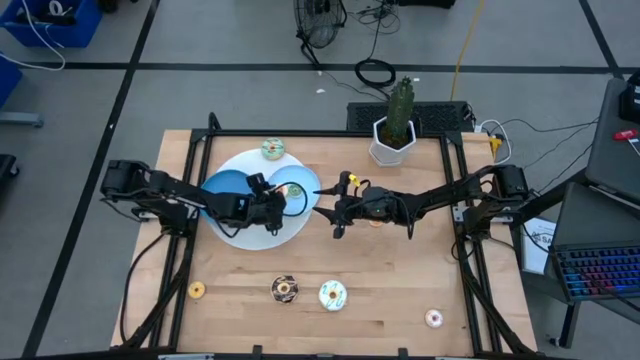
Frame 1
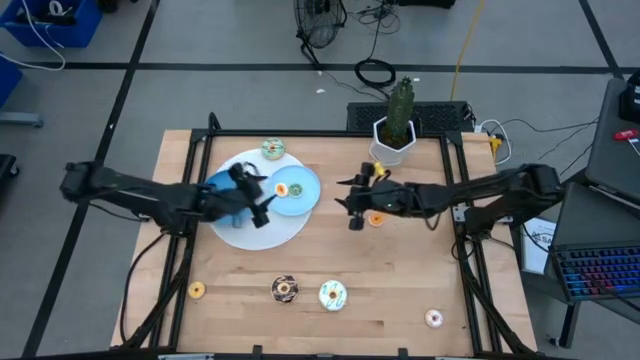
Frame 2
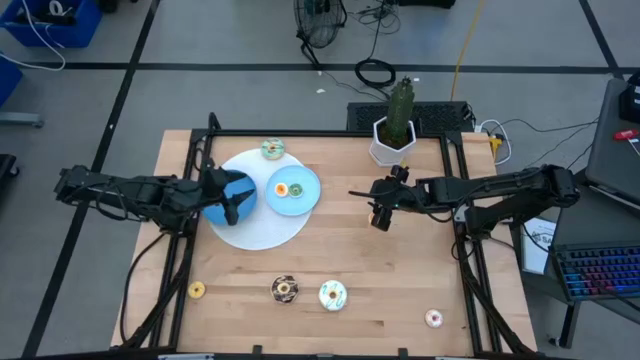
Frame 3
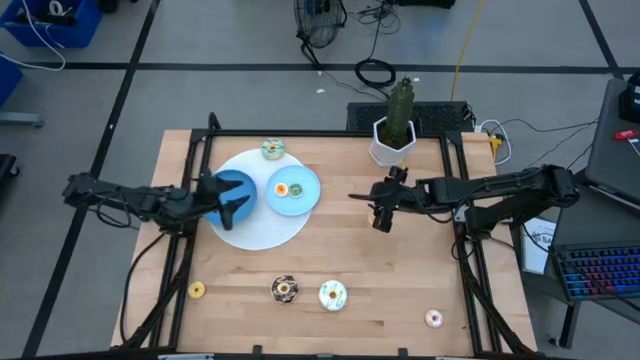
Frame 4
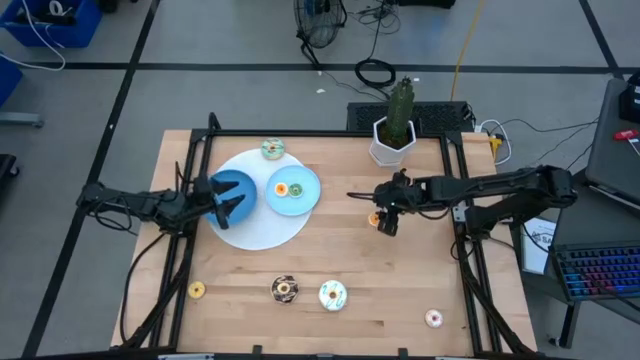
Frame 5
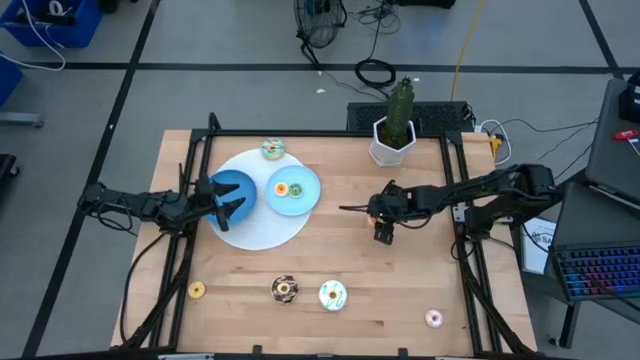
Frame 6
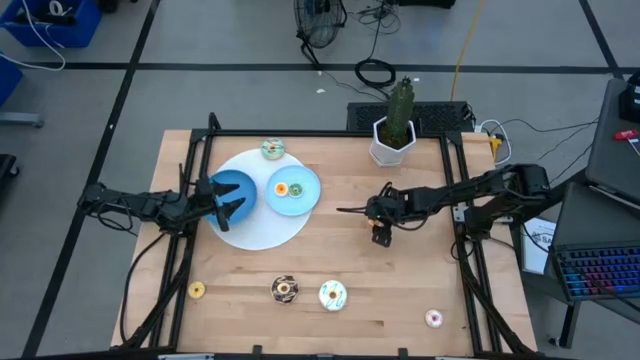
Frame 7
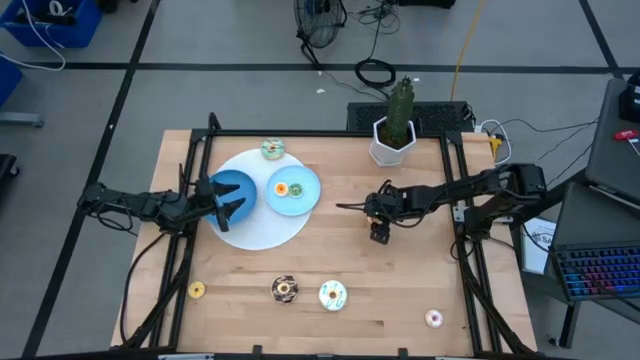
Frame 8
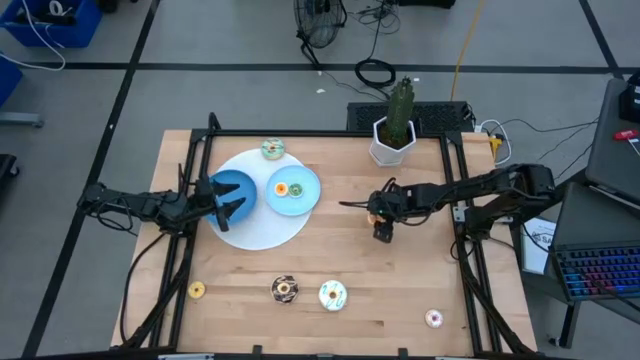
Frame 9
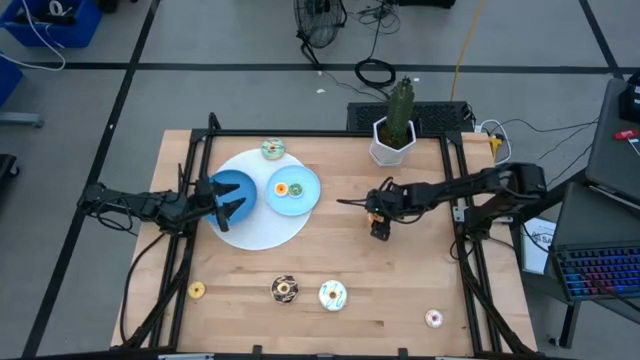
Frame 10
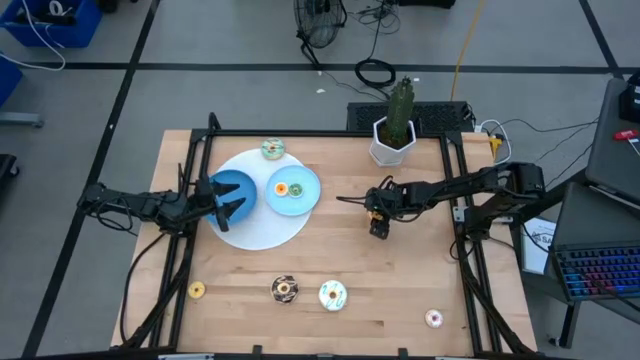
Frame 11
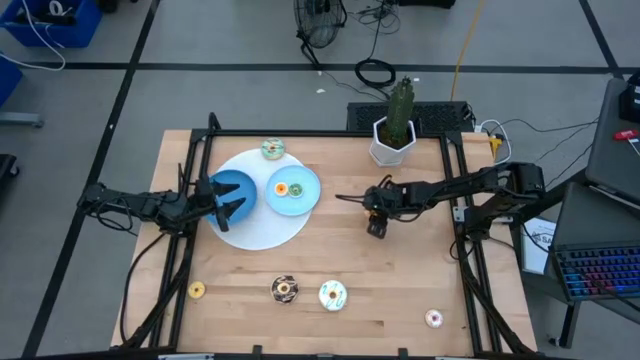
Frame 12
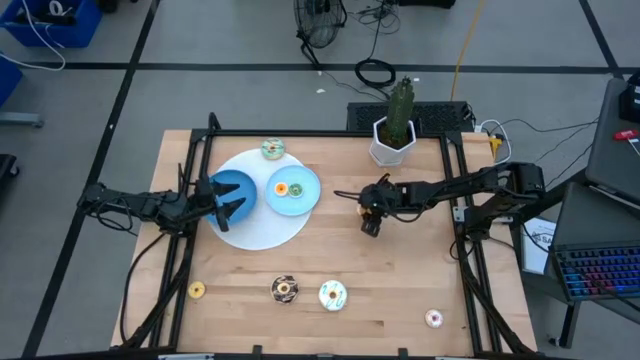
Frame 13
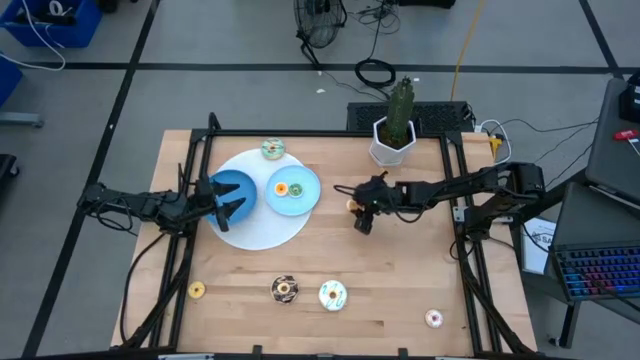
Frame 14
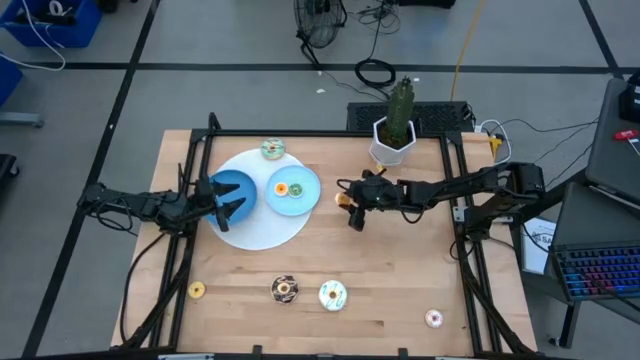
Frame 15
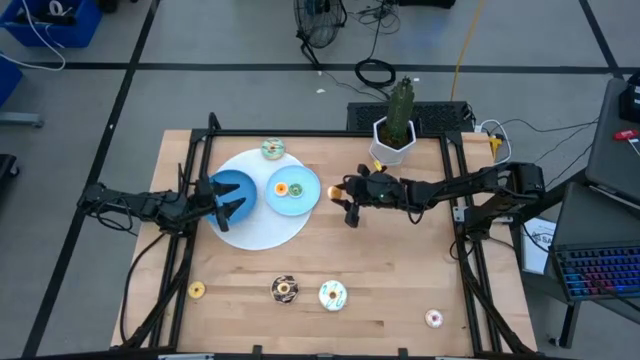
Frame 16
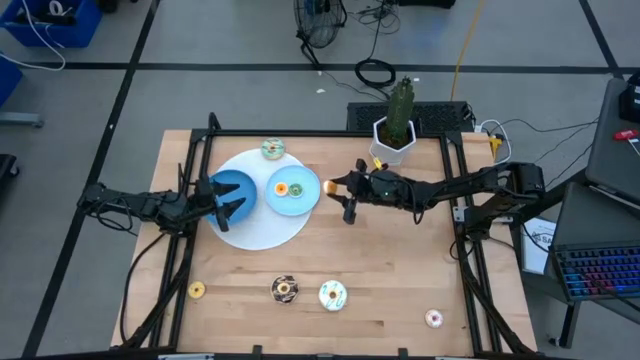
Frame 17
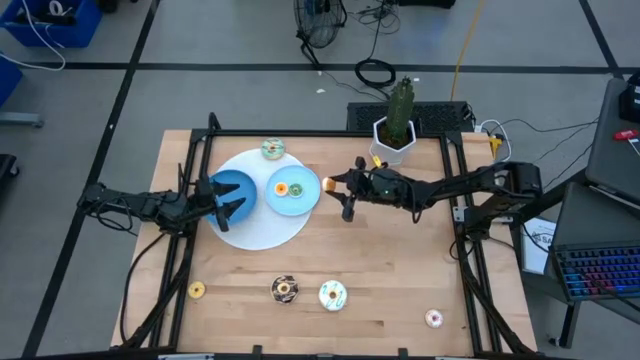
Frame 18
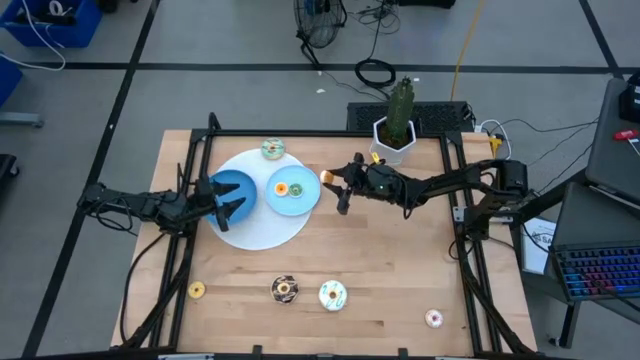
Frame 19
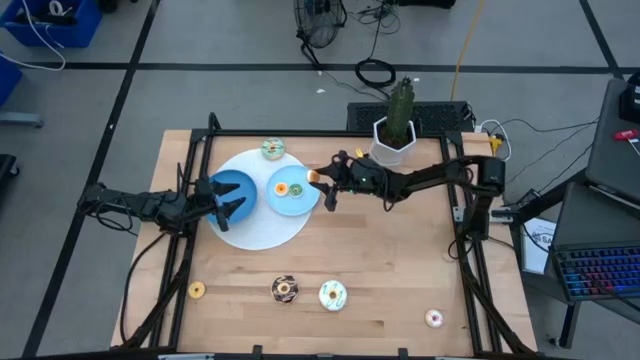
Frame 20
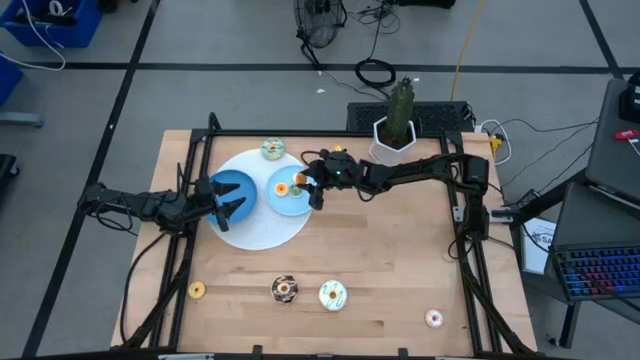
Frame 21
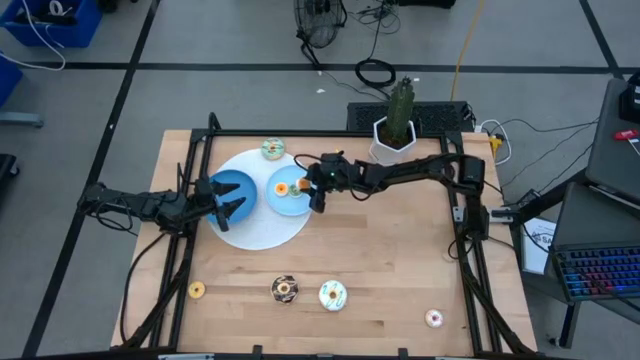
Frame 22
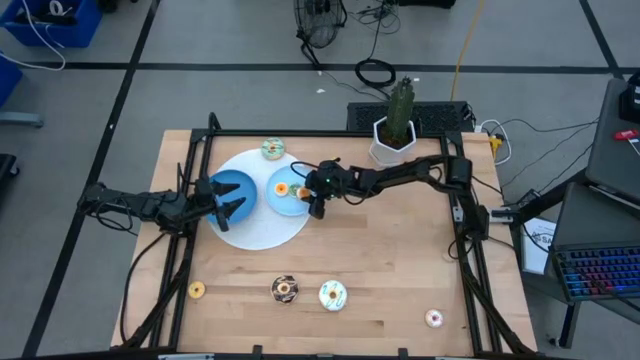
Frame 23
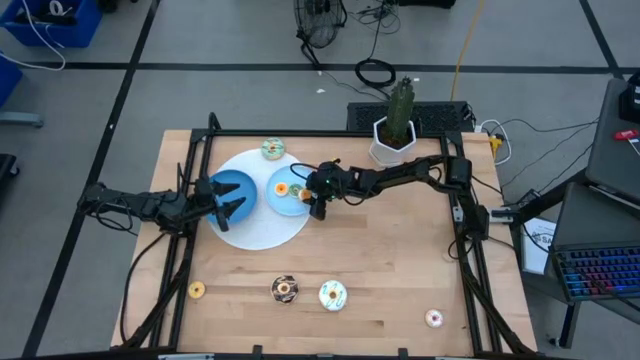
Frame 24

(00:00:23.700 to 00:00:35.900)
Task: Pick & Place donuts
Put the small orange donut on the blue plate

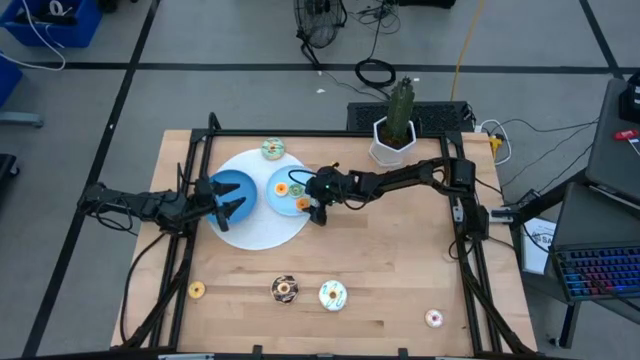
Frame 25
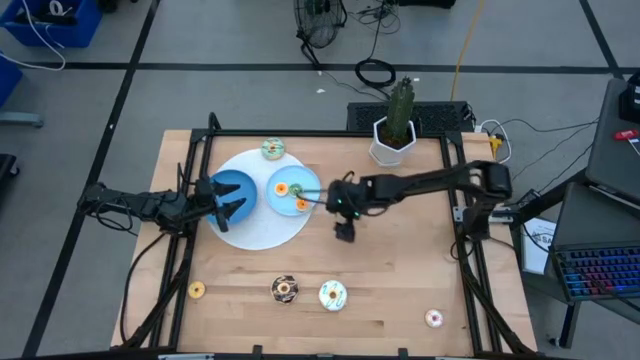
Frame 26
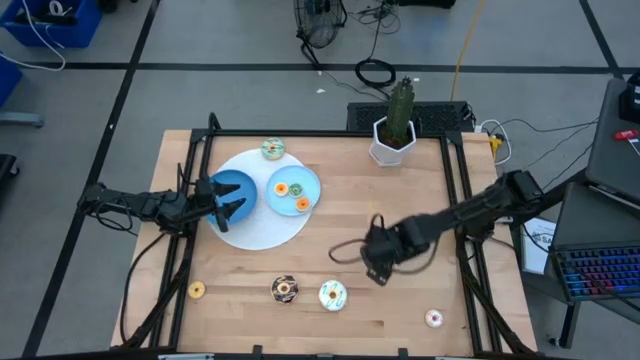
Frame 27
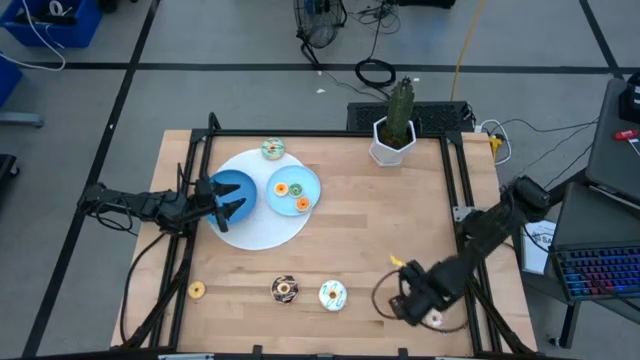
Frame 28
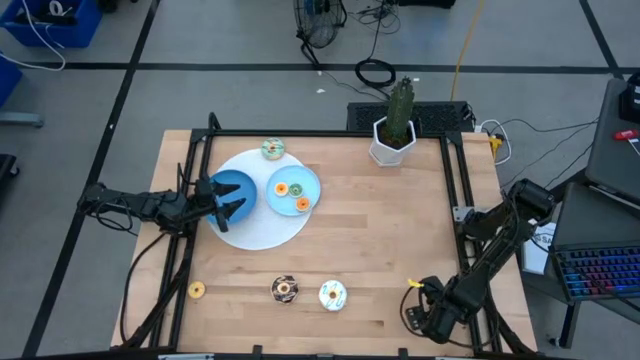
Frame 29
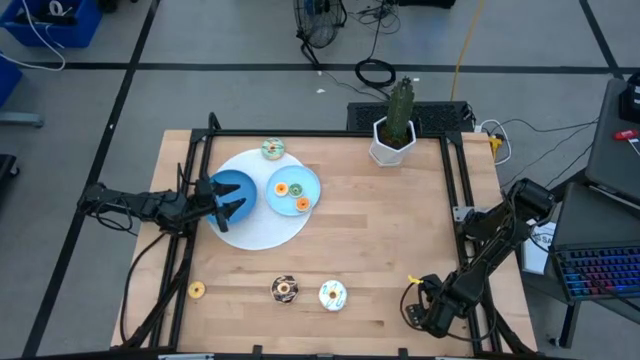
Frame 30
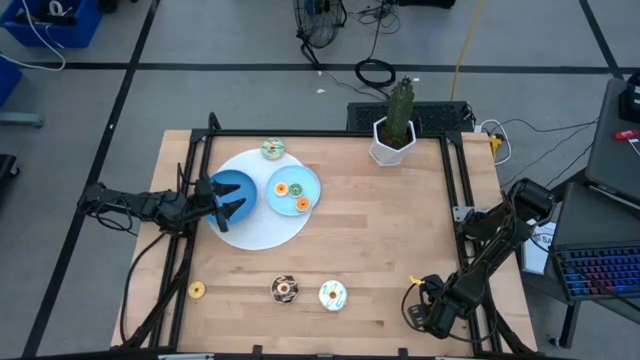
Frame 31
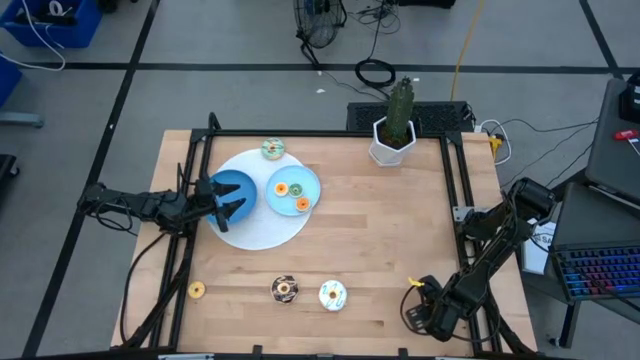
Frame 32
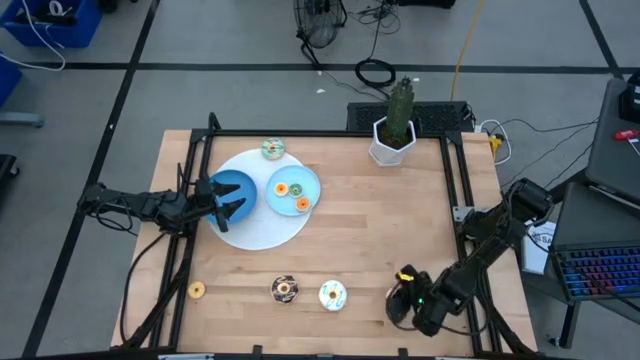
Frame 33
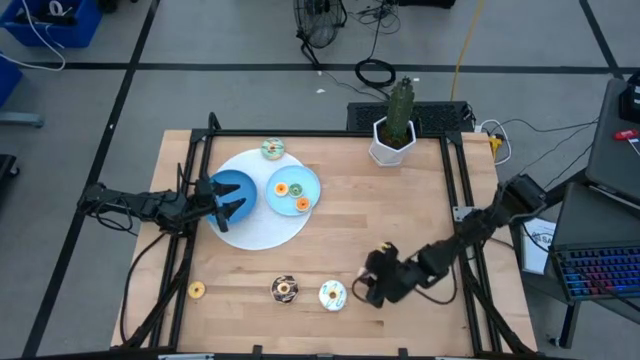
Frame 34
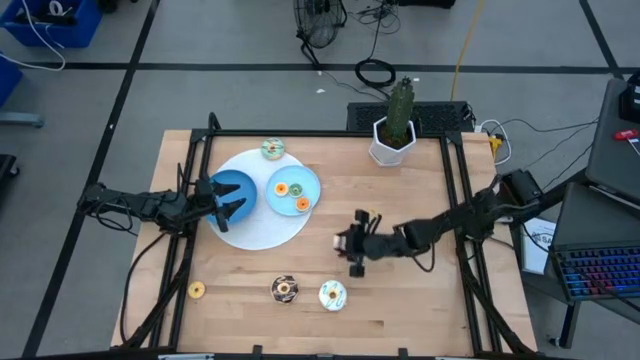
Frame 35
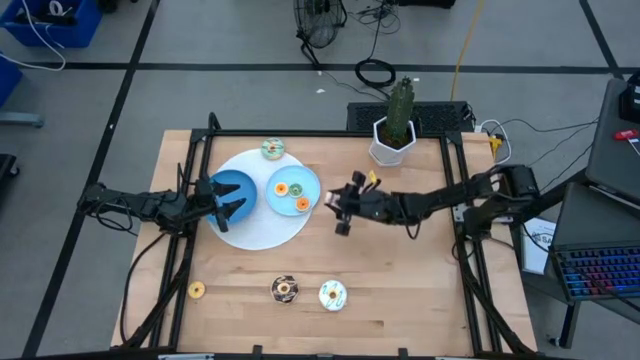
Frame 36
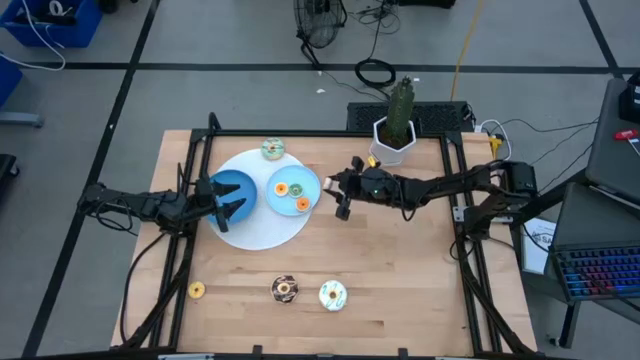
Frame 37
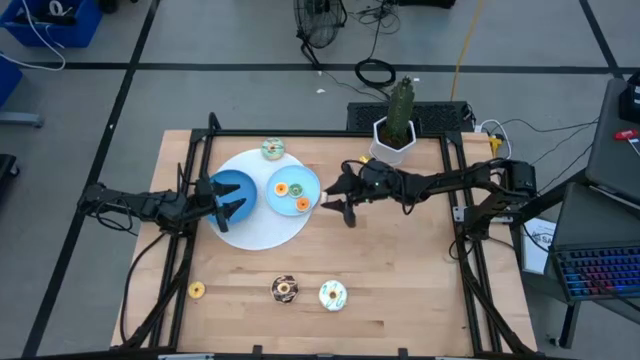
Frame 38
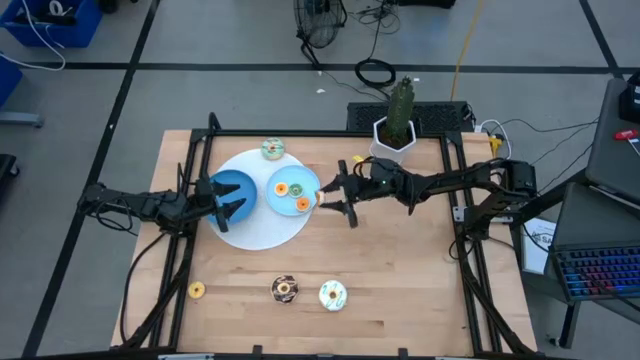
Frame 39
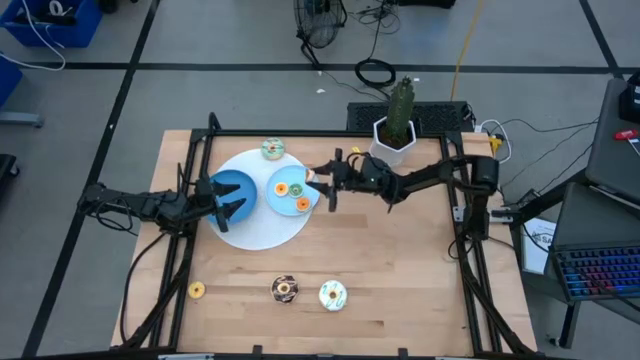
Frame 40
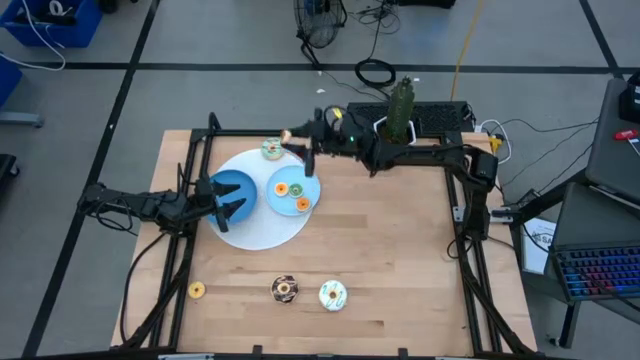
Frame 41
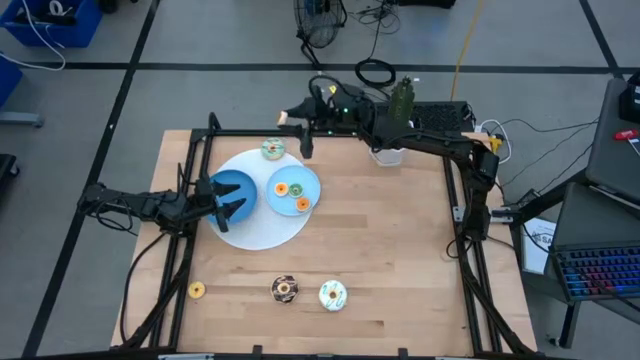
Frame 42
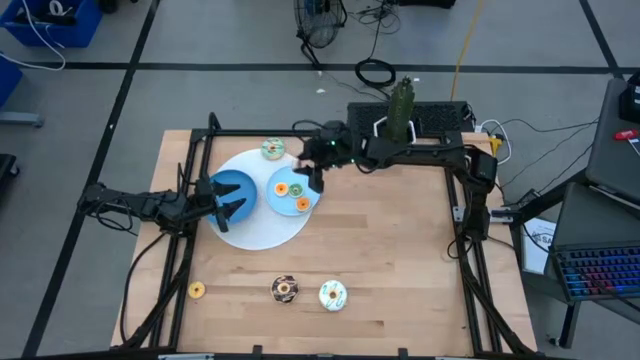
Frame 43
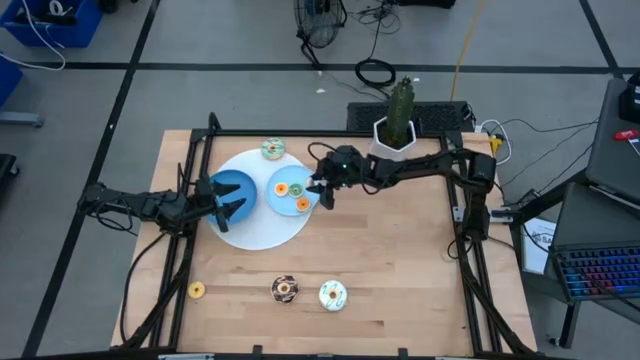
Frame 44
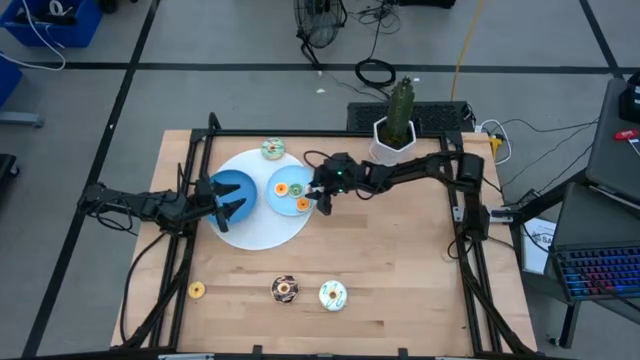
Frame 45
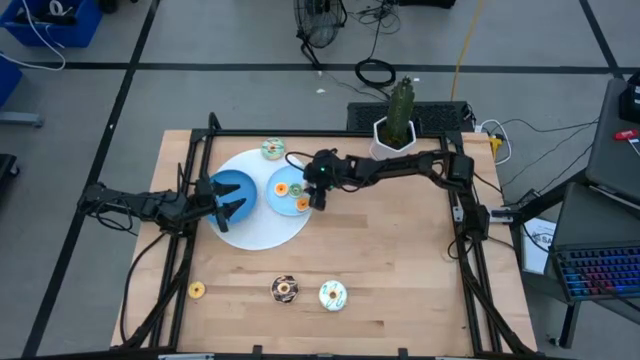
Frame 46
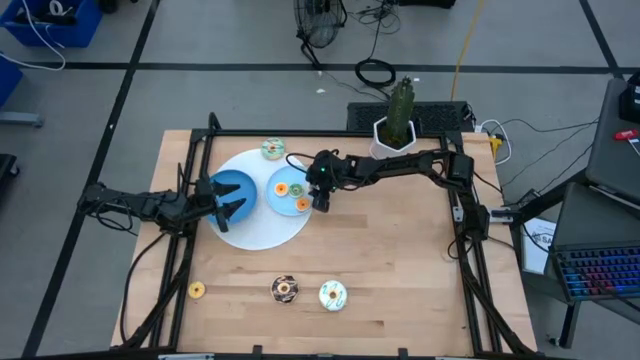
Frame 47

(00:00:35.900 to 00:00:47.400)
Put the small white donut on the blue plate
